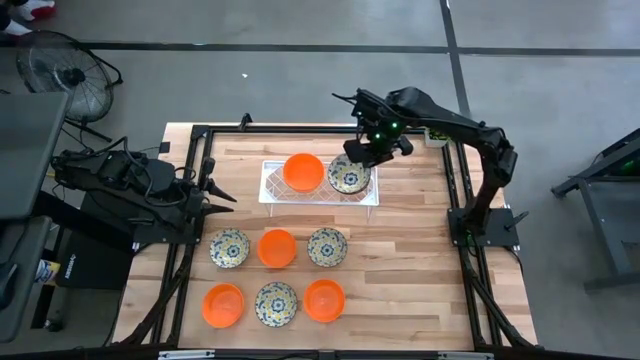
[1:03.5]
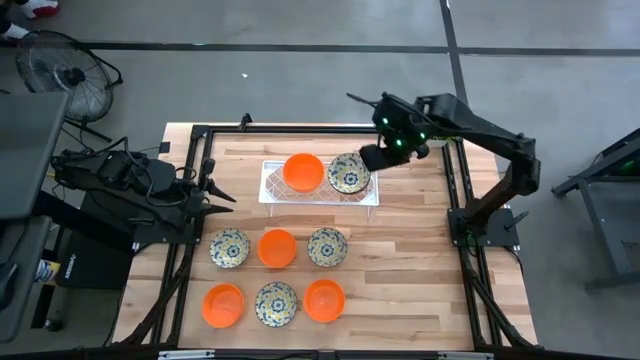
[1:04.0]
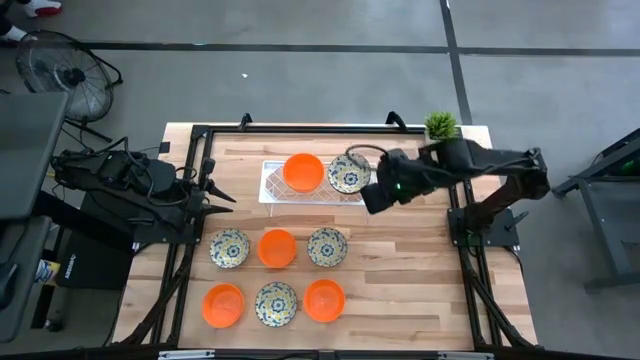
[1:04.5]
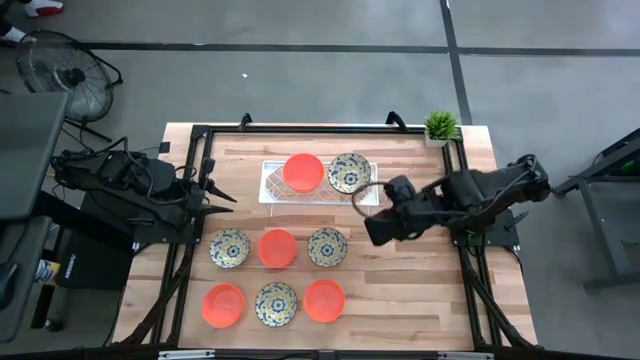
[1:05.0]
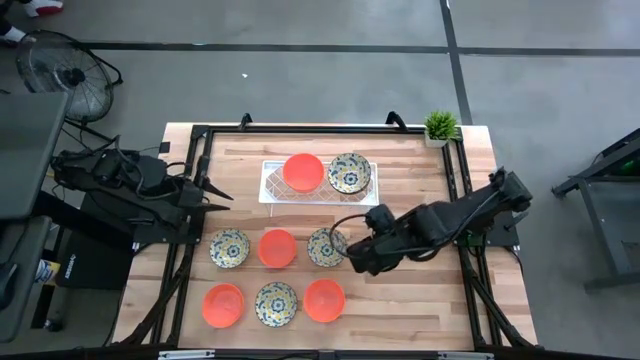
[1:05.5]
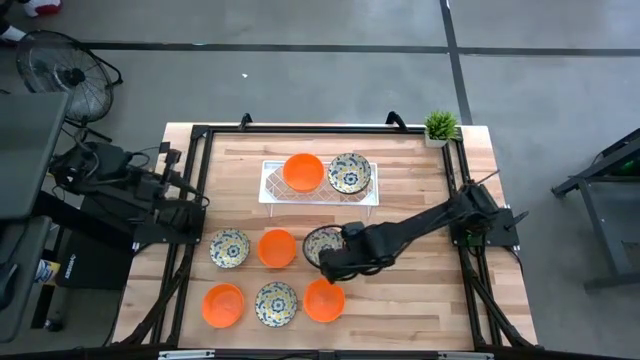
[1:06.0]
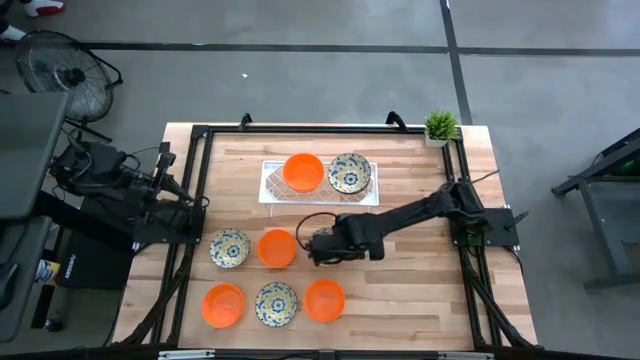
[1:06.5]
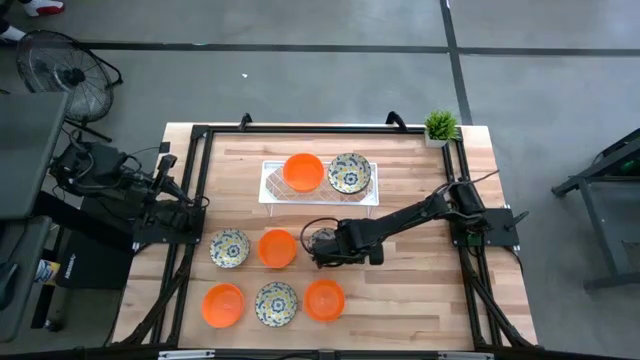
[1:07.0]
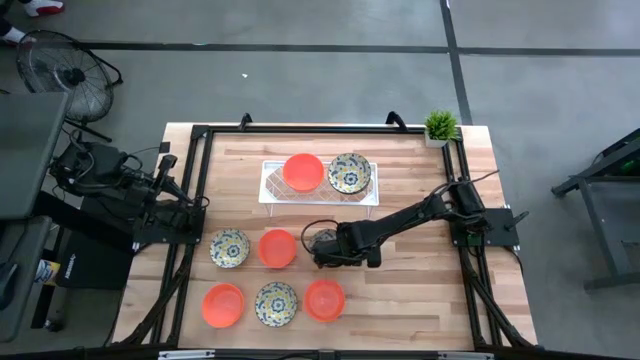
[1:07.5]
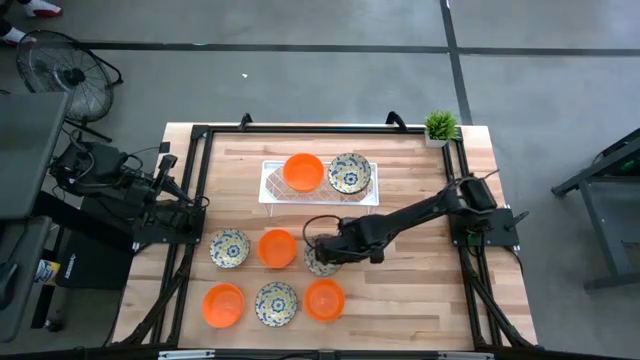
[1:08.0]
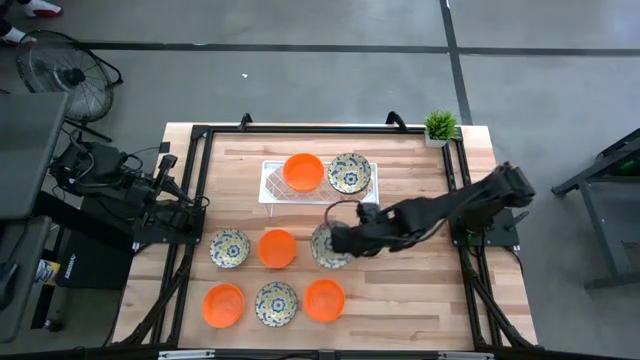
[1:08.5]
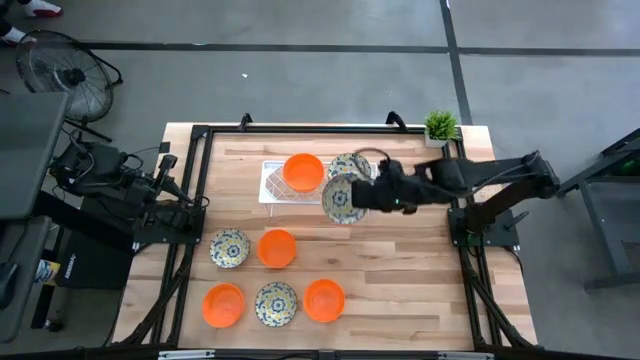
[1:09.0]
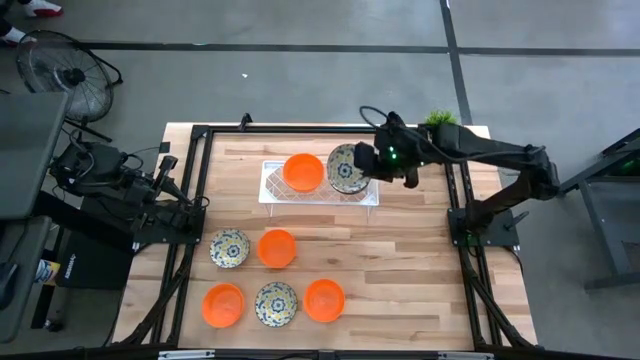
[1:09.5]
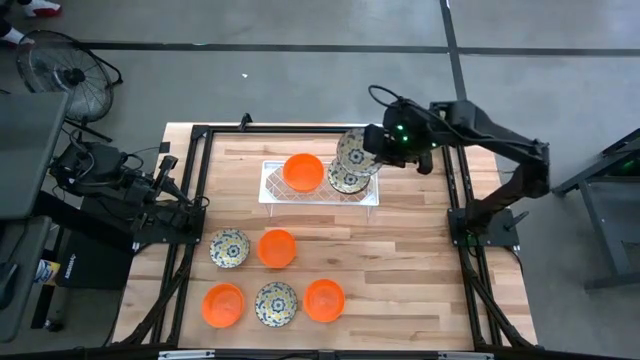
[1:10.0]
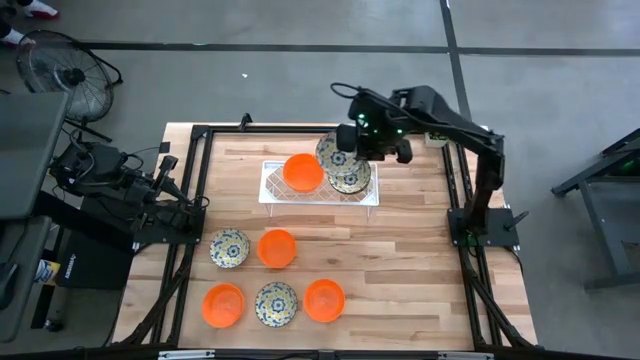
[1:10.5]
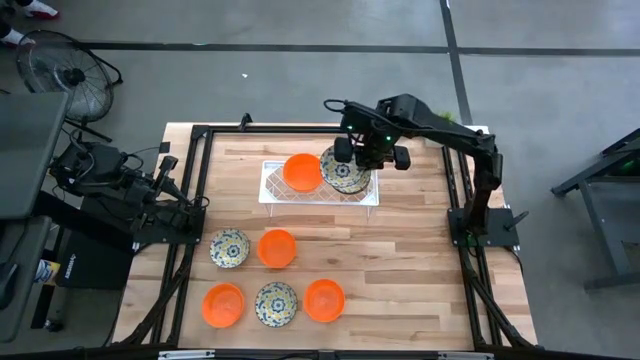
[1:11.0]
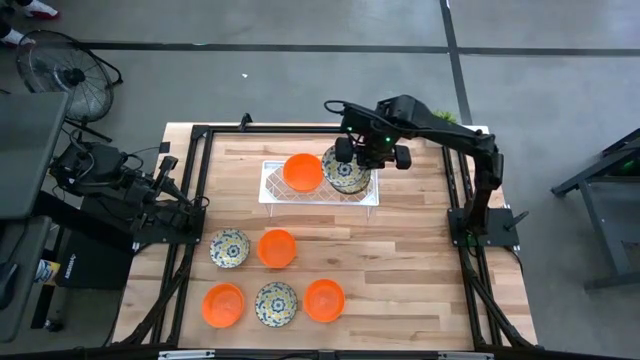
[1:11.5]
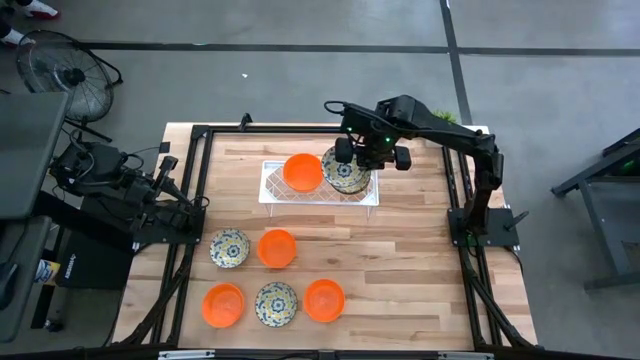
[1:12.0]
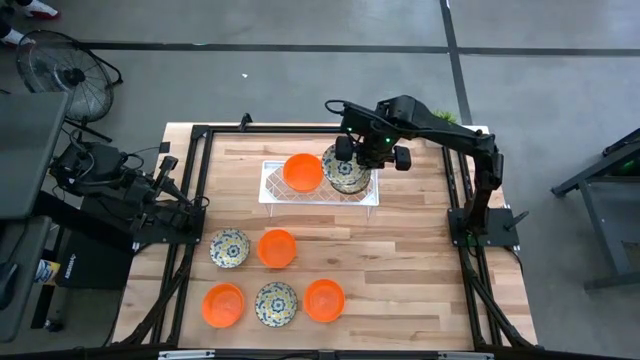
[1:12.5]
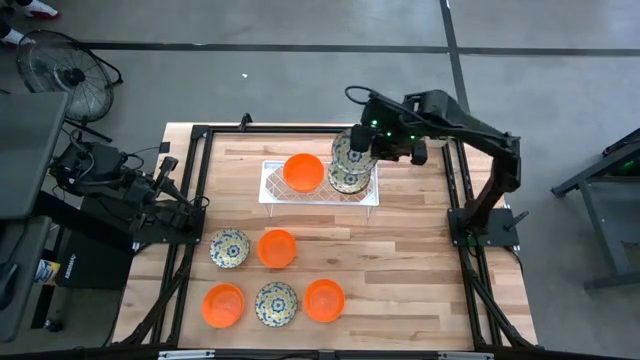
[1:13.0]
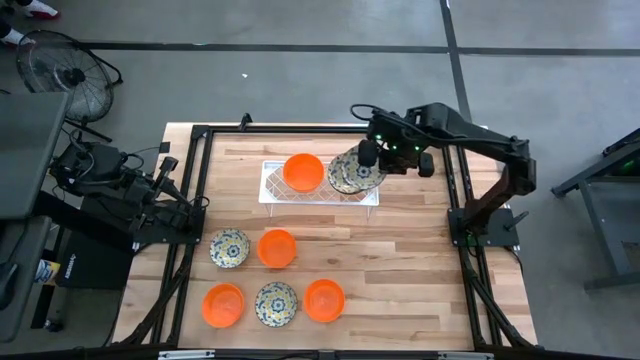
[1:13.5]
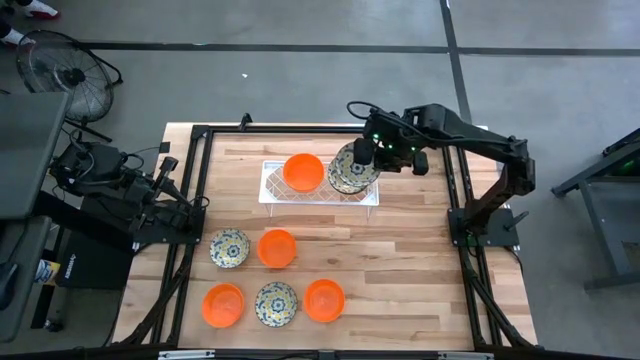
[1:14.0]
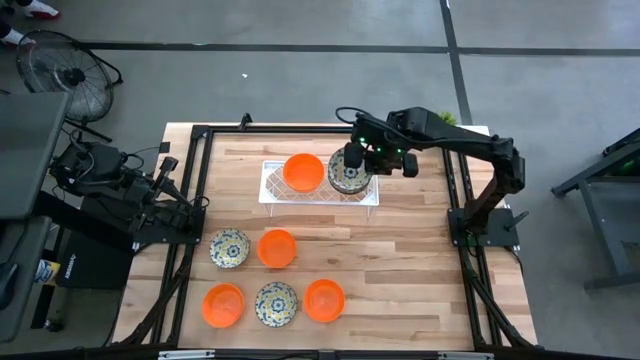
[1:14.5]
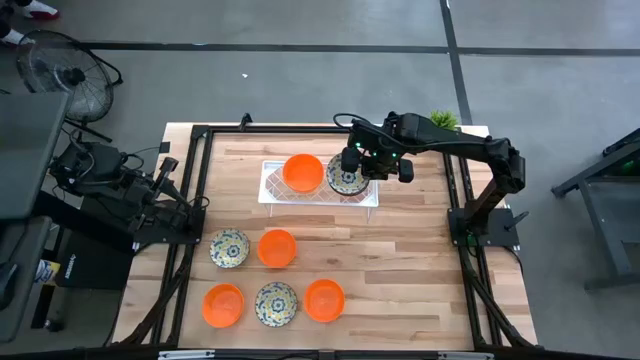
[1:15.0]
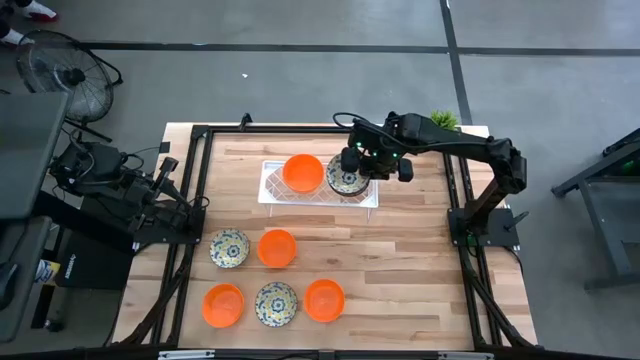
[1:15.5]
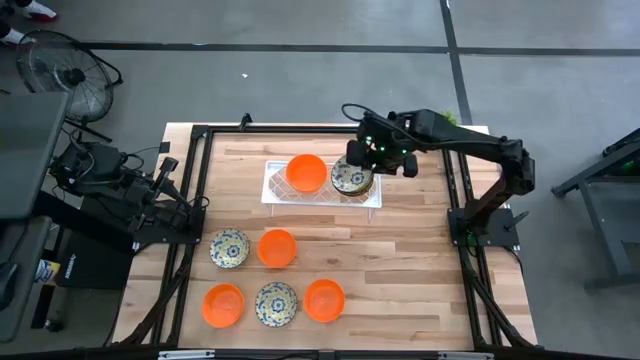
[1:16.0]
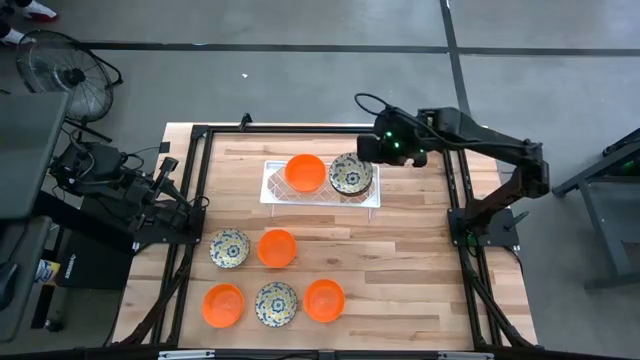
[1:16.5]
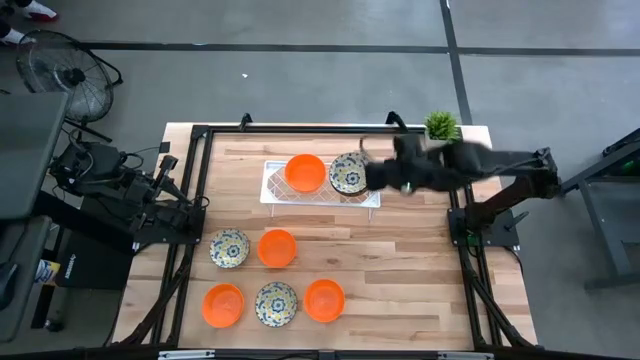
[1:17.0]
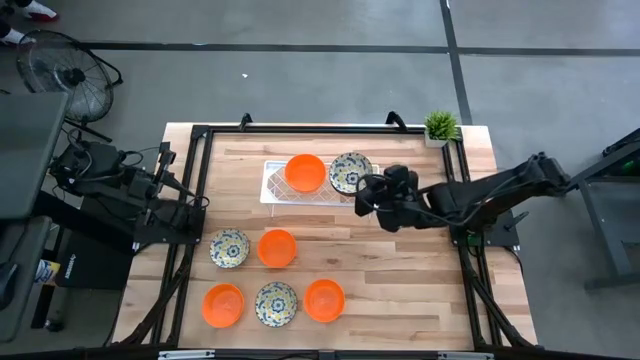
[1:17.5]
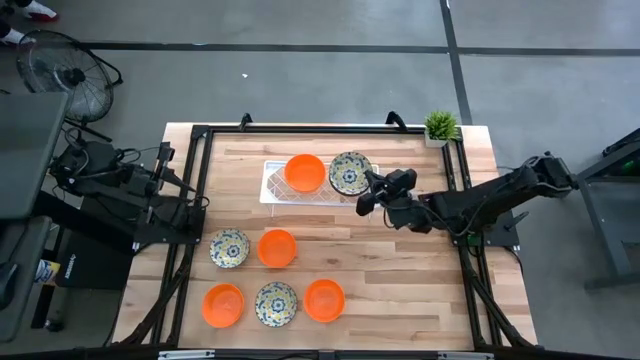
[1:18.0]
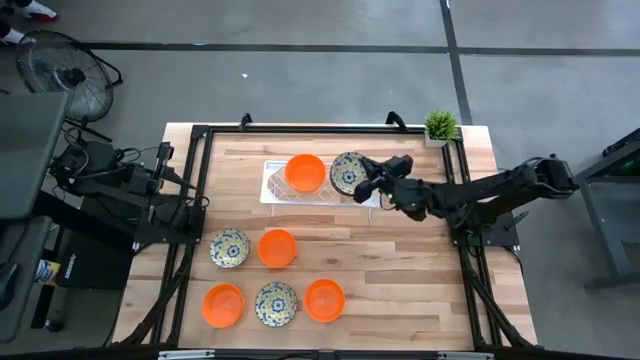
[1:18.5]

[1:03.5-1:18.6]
Task: Pick & Place Mini bowls
Stack the yellow patterned bowl on top of the other yellow patterned bowls on the shelf

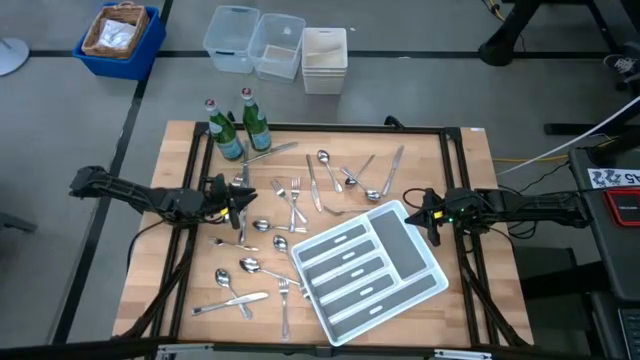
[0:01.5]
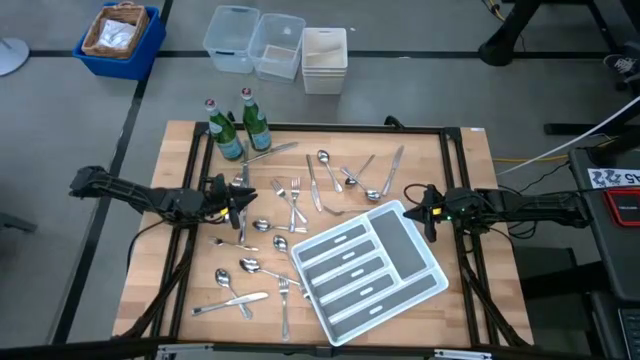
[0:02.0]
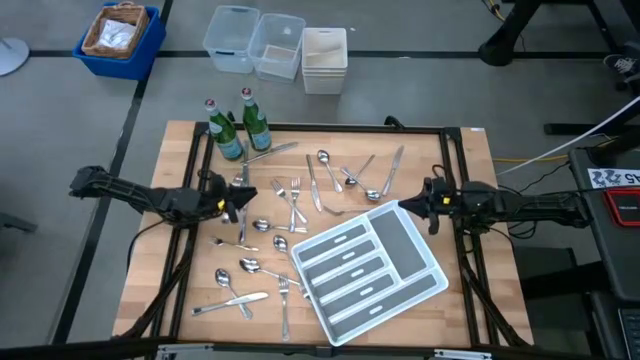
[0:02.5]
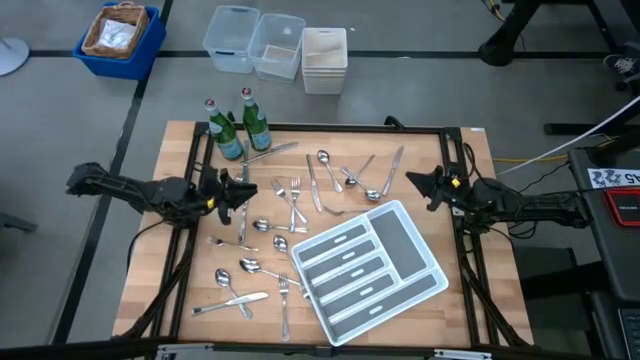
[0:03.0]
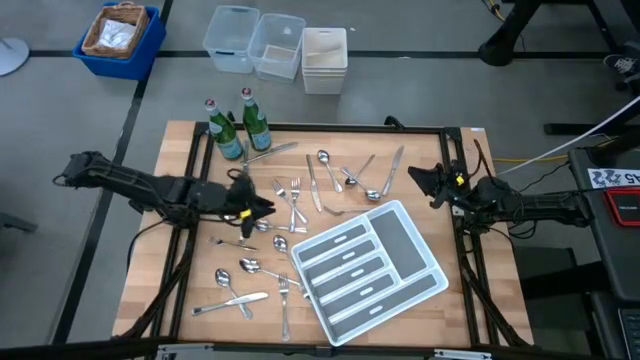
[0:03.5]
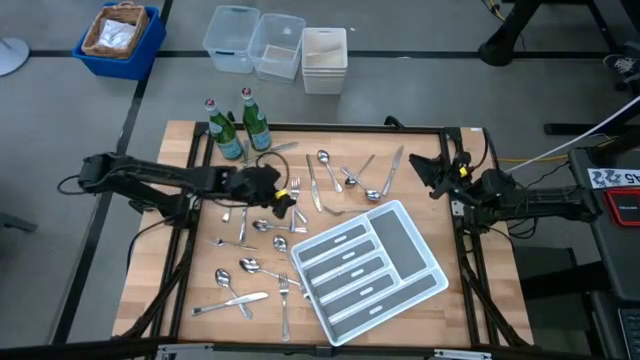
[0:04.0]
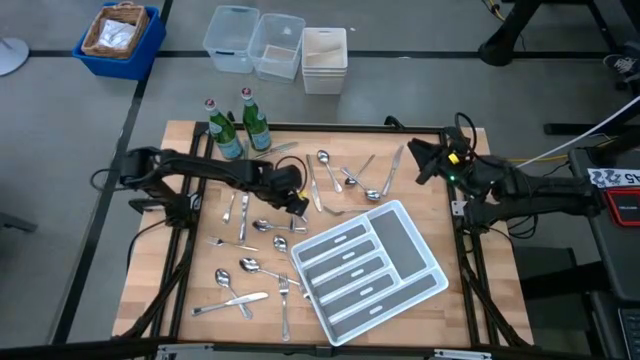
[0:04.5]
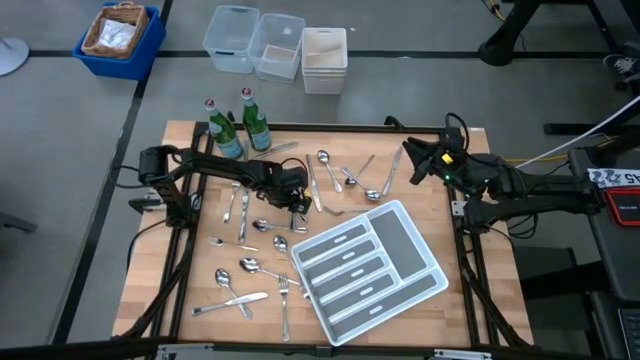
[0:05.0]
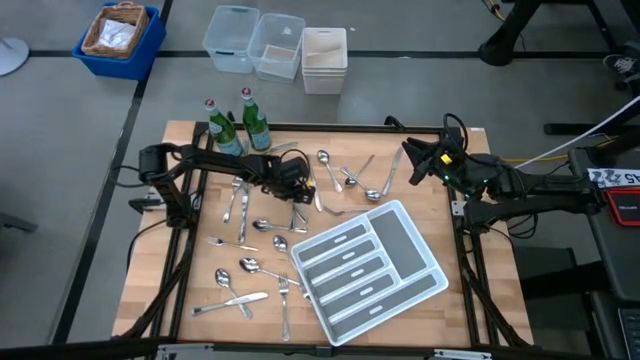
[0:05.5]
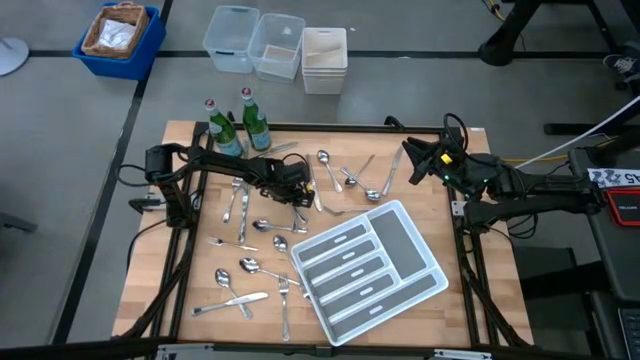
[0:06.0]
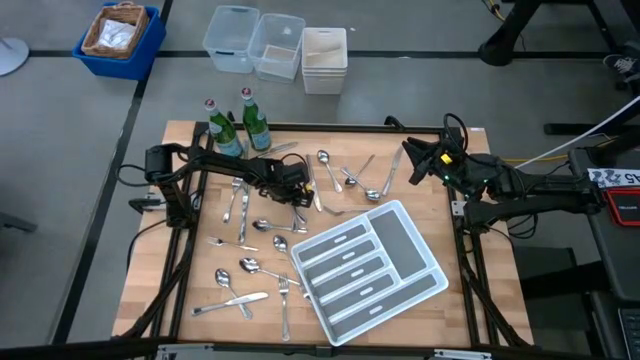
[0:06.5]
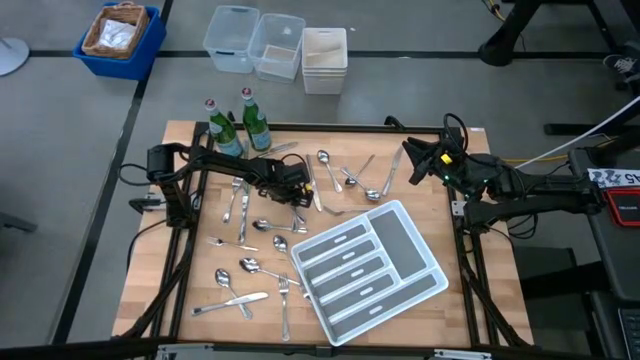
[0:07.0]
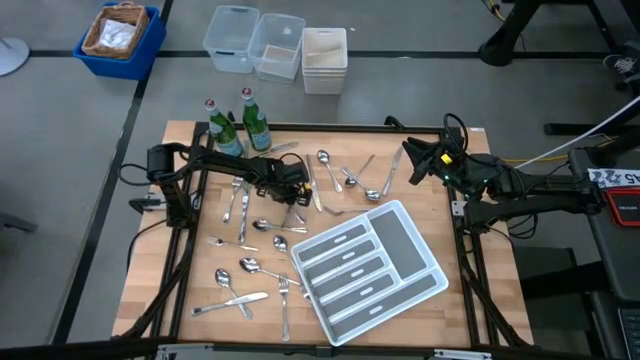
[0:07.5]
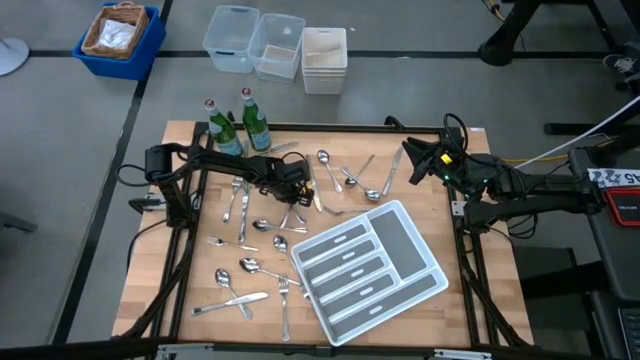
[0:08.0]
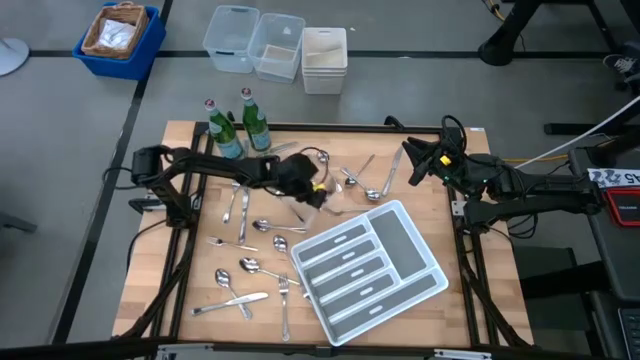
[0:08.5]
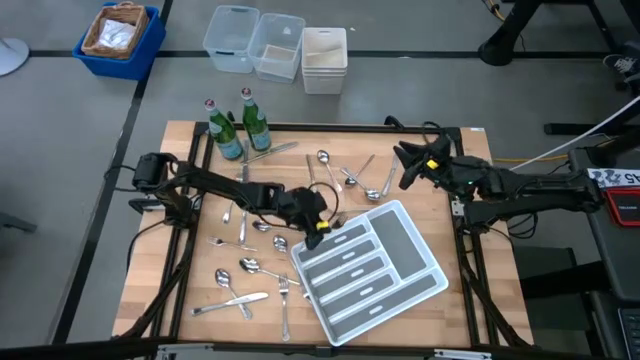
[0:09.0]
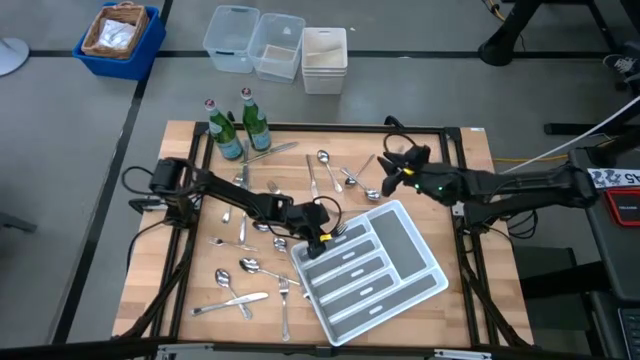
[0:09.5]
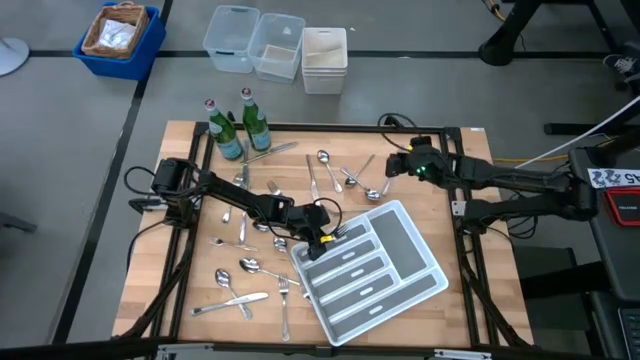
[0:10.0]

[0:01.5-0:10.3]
Task: Sort silverware
Put the silver fork into the white silverware tray
